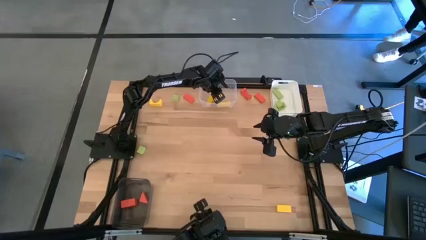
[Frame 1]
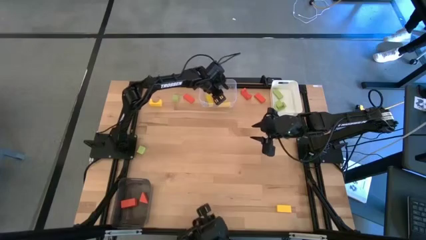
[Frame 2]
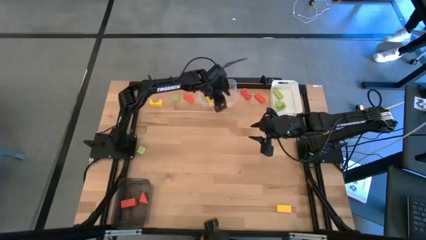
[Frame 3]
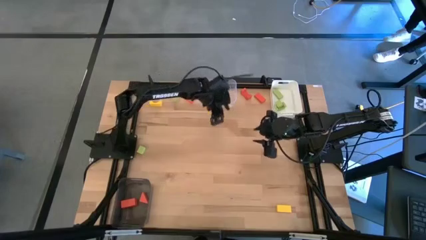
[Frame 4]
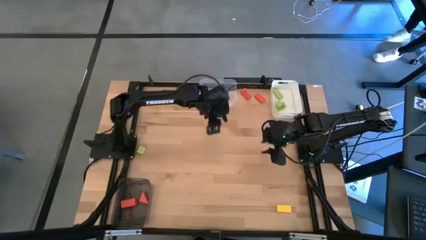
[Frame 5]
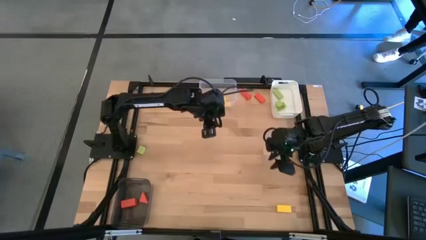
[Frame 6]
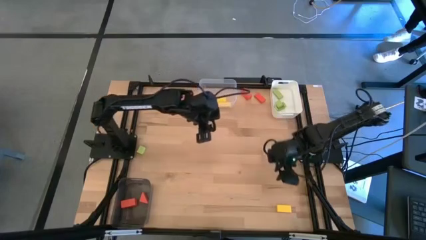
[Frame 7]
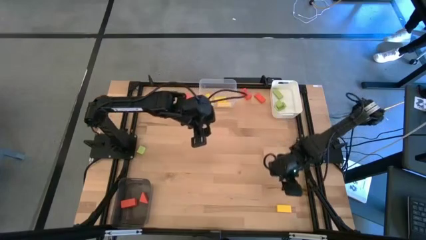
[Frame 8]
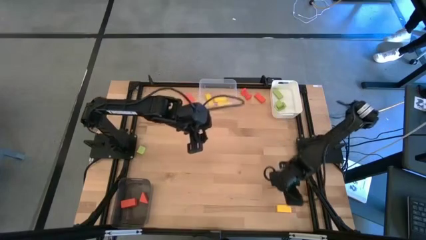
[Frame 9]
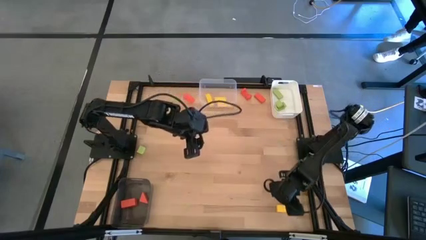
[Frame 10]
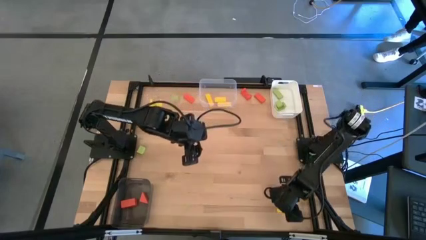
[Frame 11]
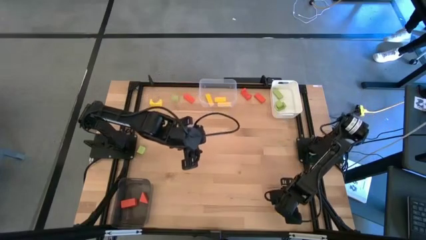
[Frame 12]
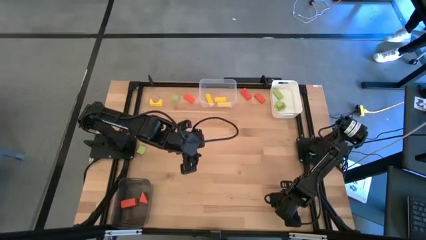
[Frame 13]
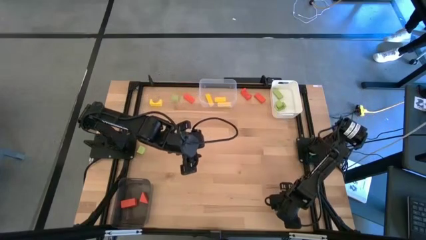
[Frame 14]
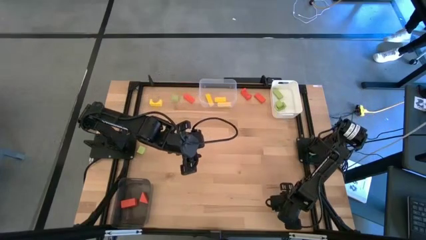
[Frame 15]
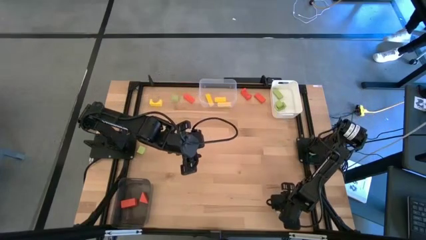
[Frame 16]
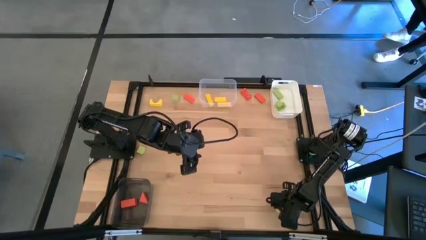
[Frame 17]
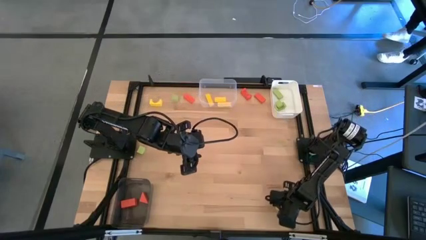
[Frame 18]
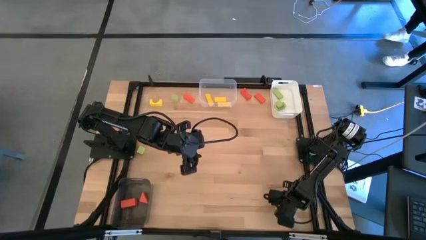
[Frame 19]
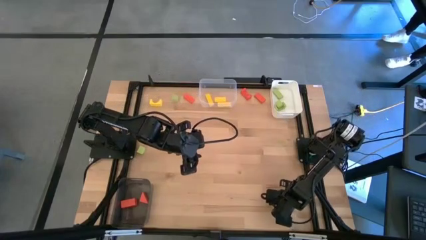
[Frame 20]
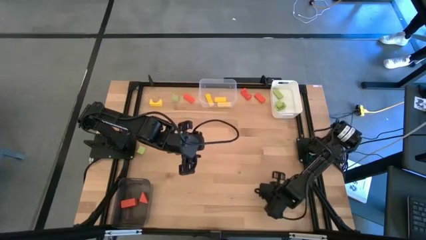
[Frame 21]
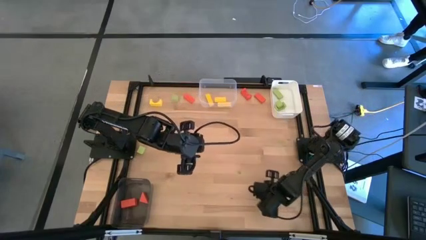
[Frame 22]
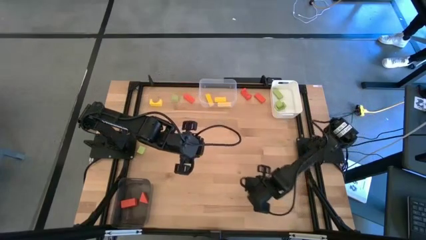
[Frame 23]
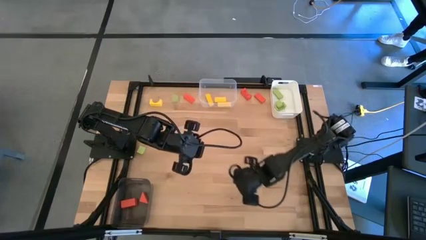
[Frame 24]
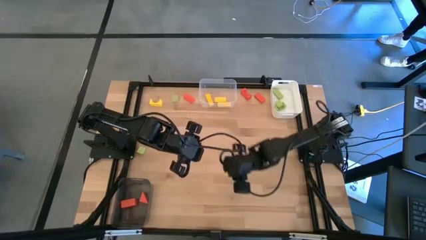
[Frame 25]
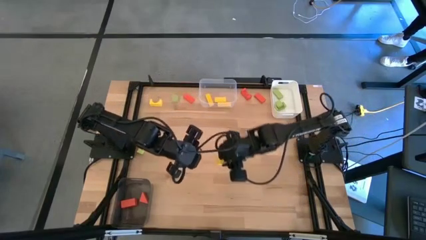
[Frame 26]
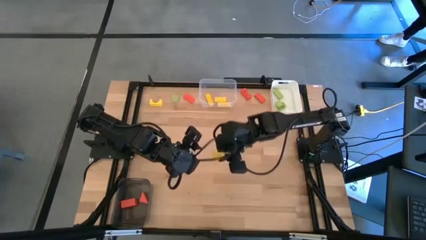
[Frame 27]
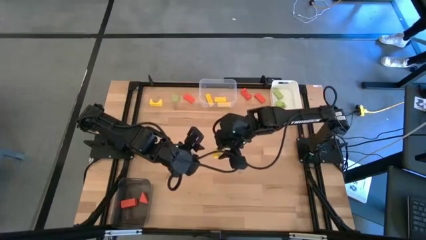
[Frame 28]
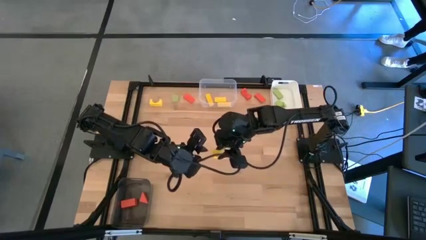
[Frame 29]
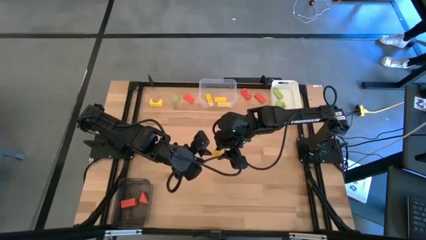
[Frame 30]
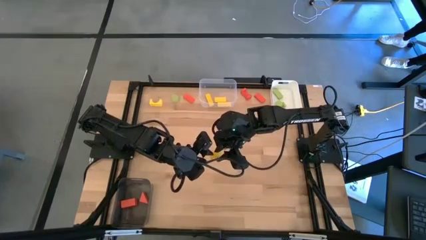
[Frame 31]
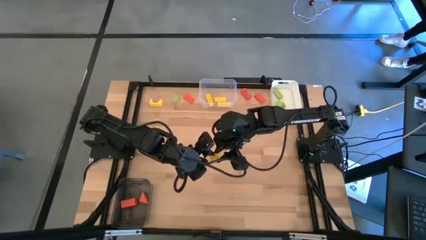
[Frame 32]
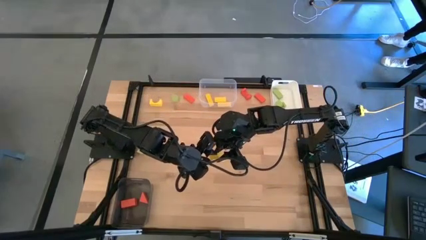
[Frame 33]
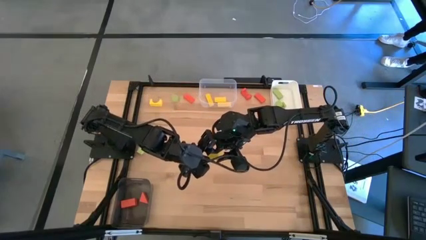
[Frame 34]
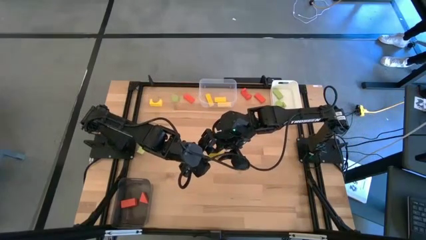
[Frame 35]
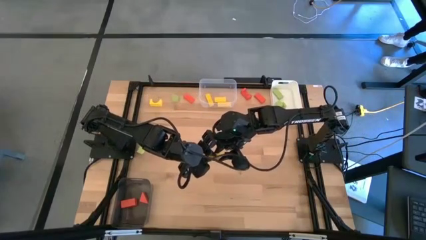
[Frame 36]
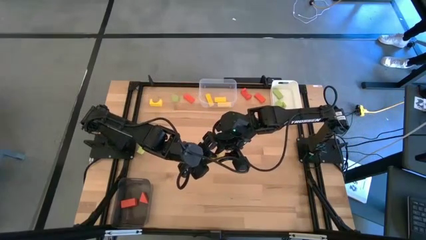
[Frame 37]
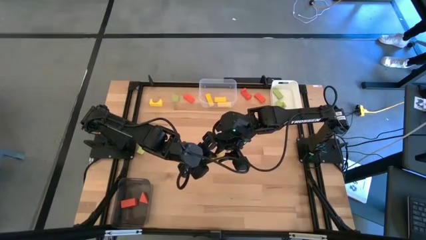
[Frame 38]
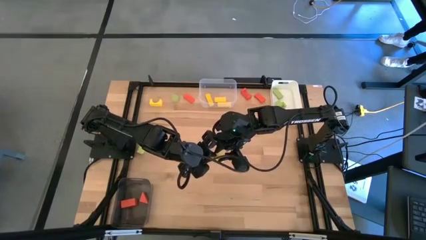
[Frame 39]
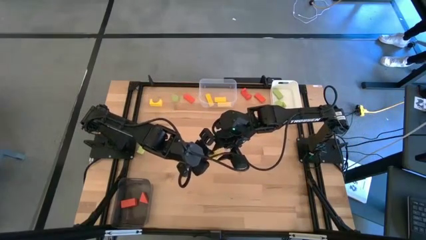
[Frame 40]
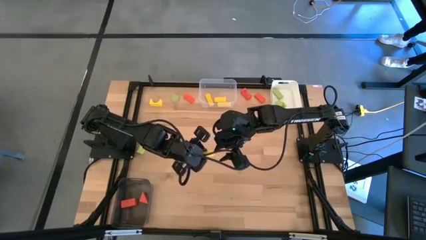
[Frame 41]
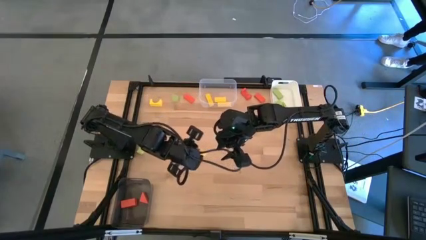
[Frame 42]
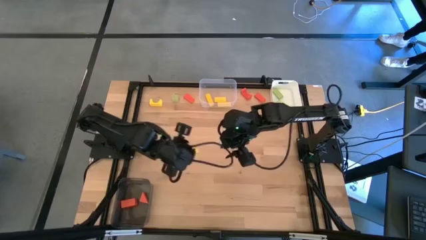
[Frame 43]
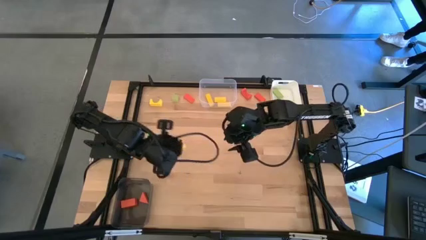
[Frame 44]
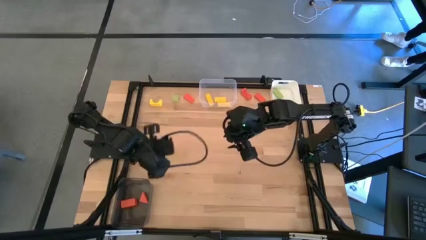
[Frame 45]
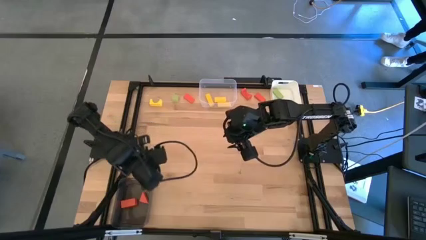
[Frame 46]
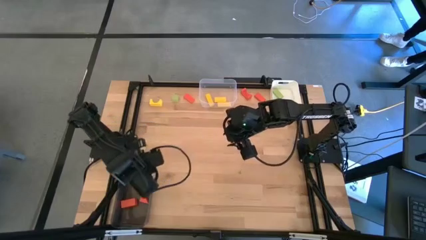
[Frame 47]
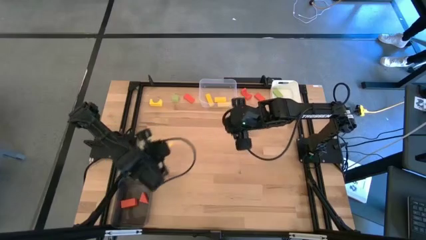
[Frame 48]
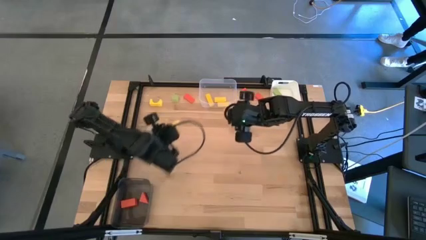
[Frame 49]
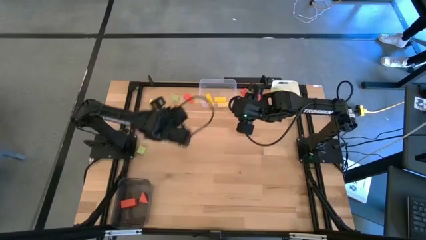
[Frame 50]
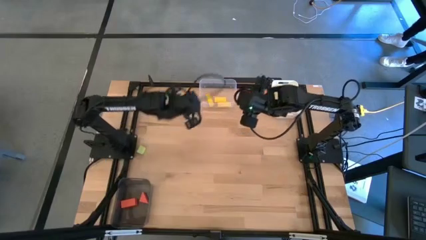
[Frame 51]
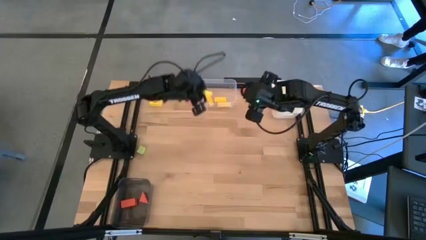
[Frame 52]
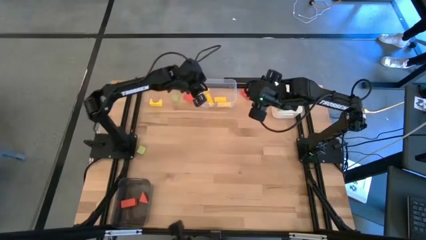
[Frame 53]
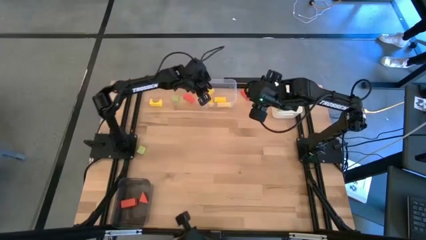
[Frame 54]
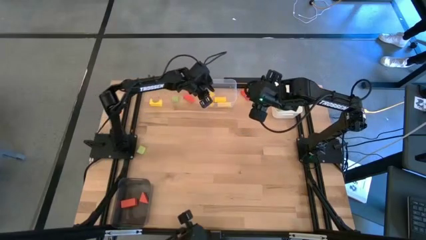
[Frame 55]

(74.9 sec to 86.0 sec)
Task: Sort & place blocks by color
Put the yellow rectangular block into the transparent bin
